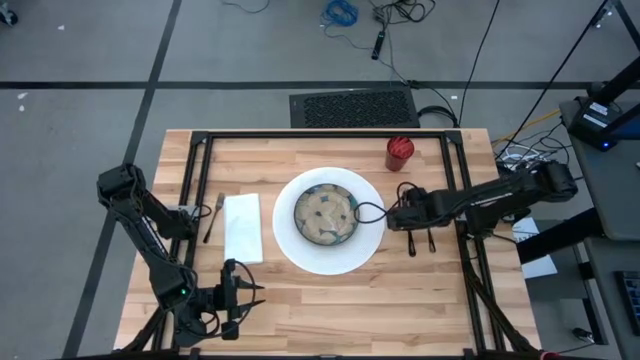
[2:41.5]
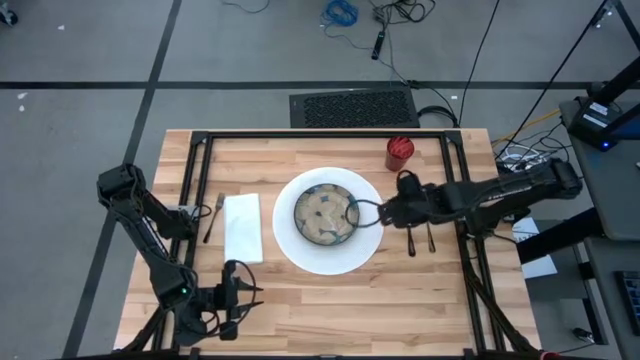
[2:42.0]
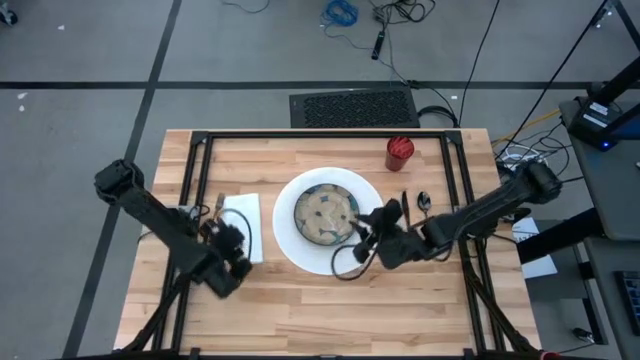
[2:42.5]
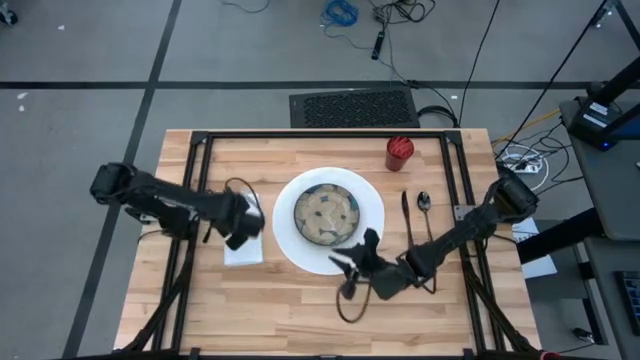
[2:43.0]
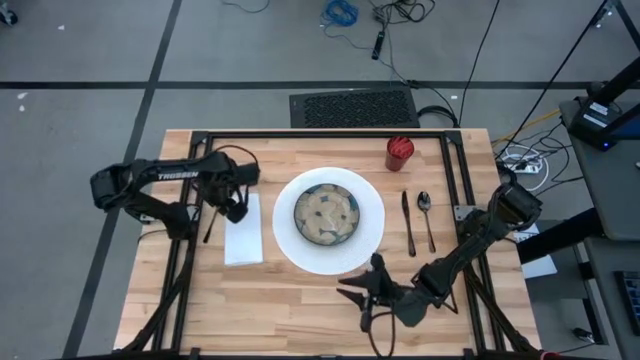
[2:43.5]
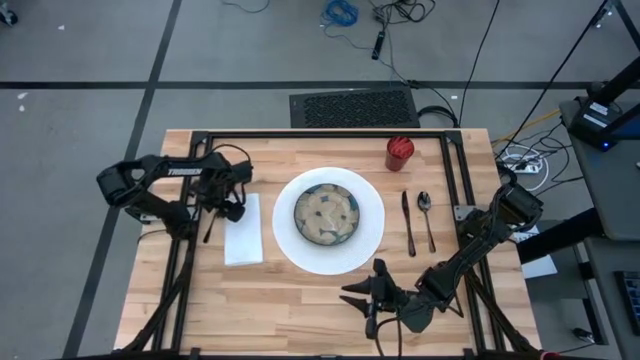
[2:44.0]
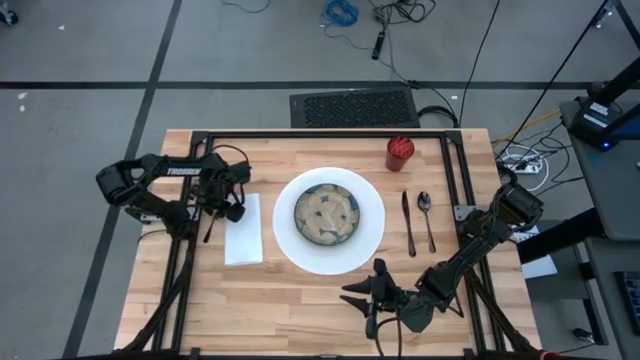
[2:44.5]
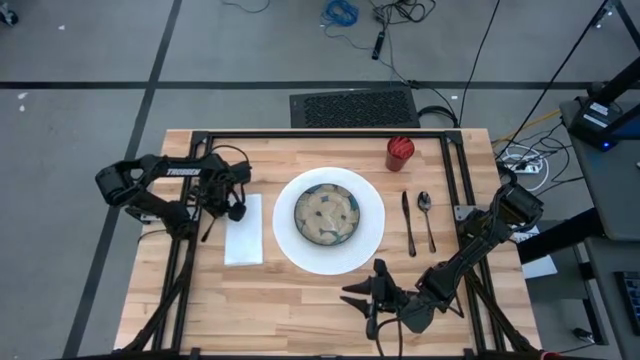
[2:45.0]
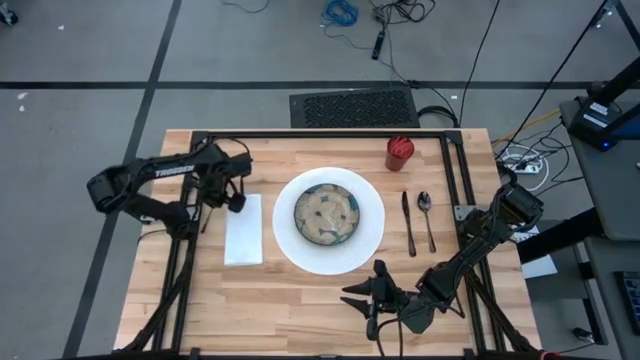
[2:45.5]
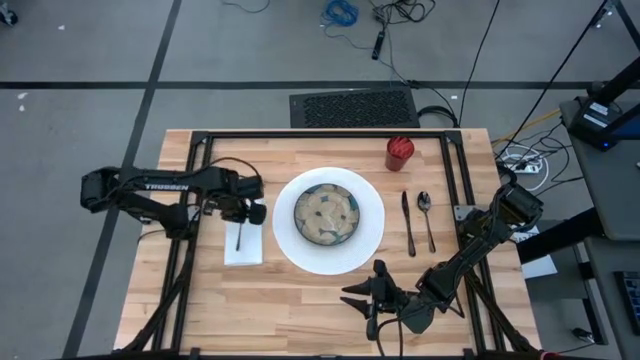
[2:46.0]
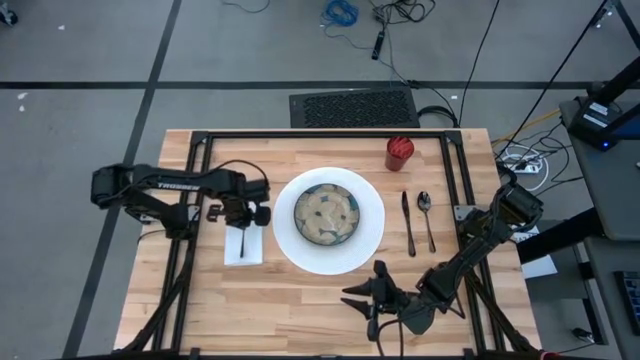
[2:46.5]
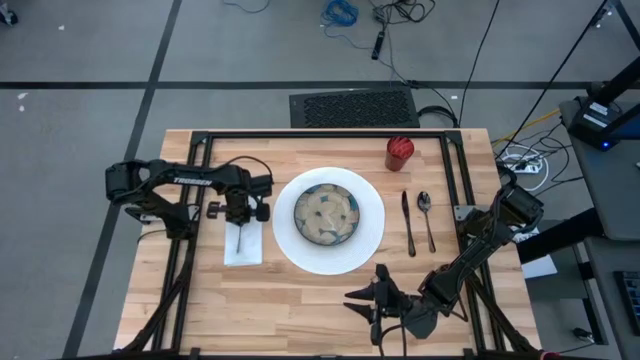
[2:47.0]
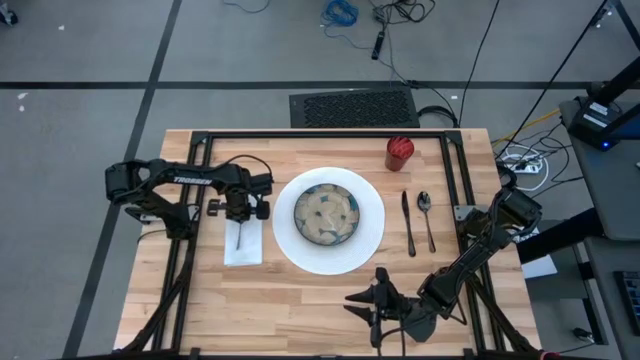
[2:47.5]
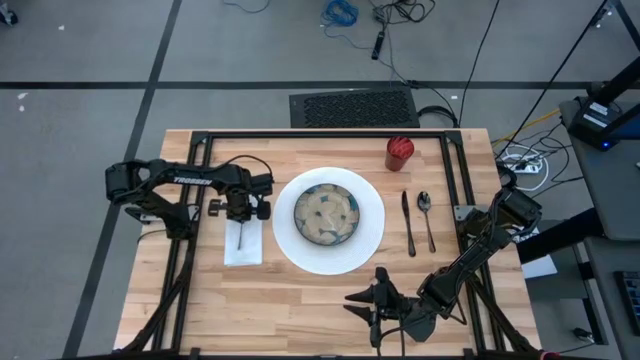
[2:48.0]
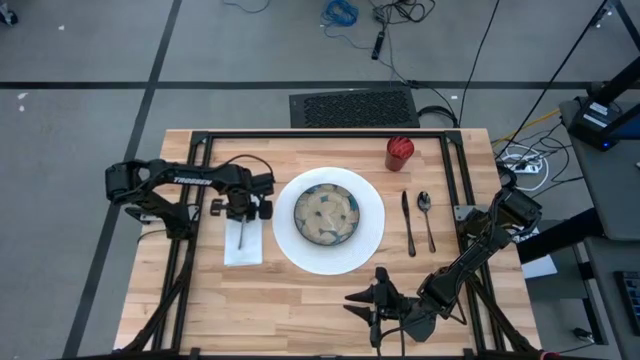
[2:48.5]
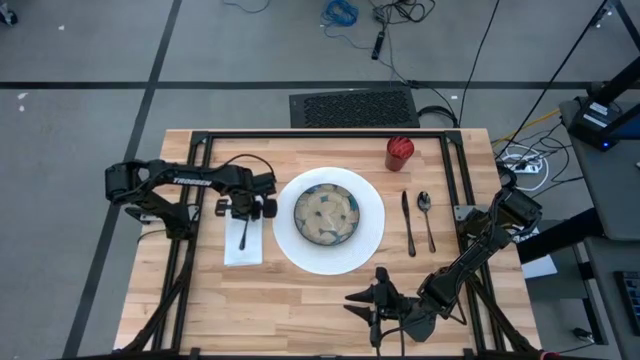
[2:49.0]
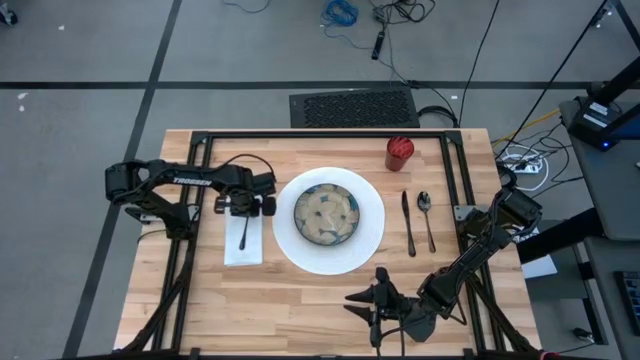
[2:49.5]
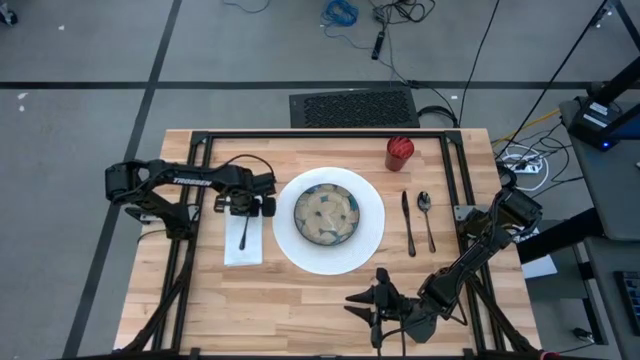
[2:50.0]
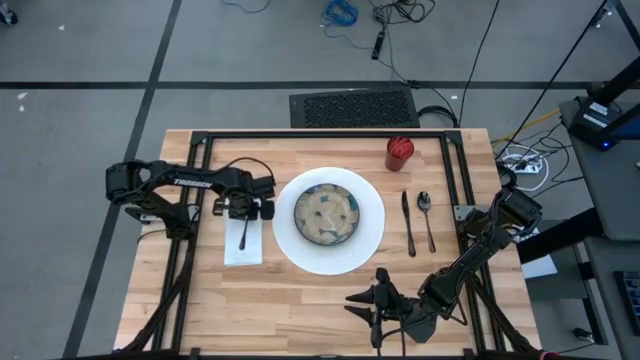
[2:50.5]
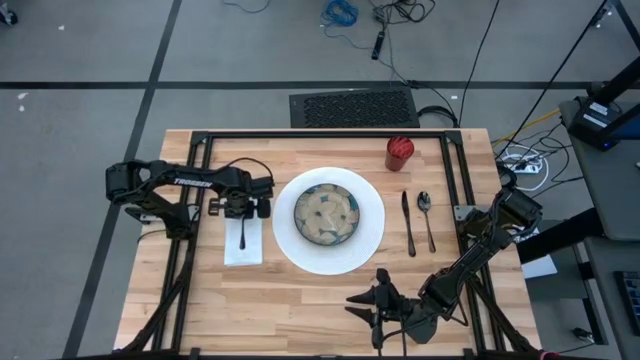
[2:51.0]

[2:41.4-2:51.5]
Task: Set table place
Put the black fork on the white table napkin

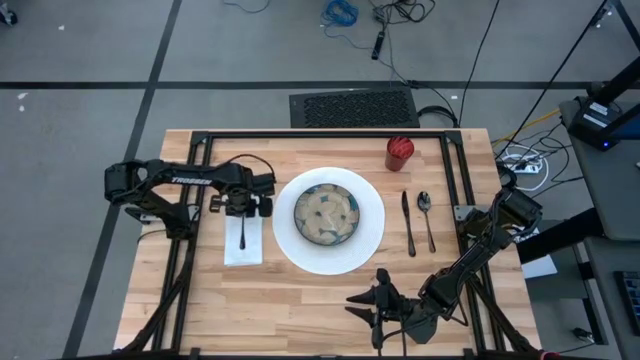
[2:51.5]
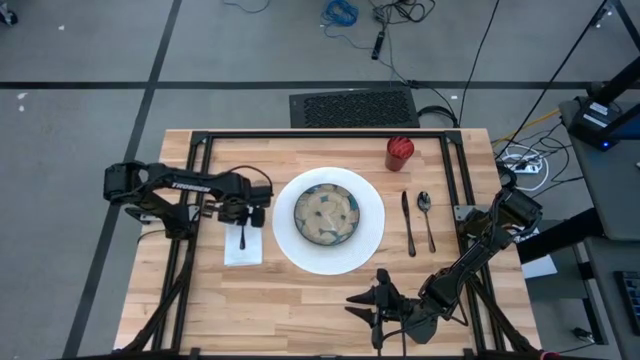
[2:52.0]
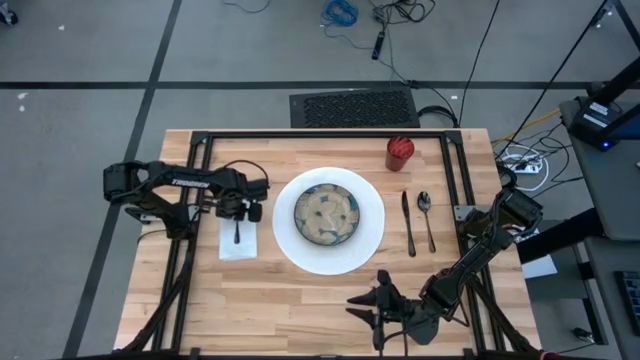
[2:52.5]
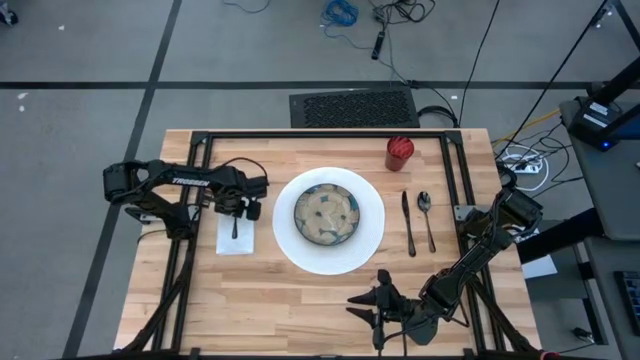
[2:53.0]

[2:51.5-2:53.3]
Adjust the white table napkin

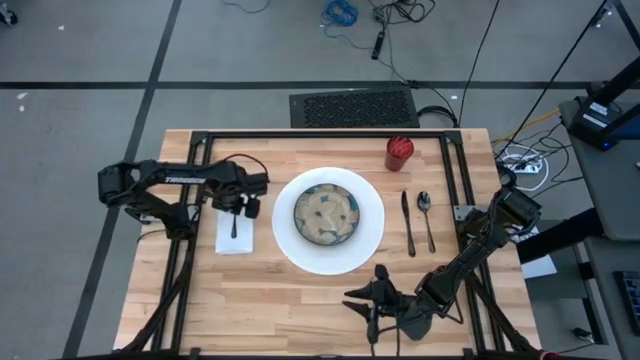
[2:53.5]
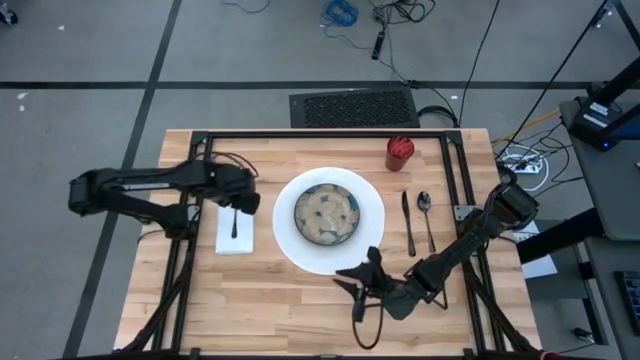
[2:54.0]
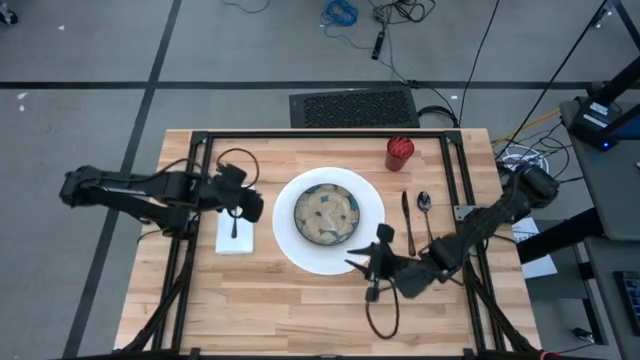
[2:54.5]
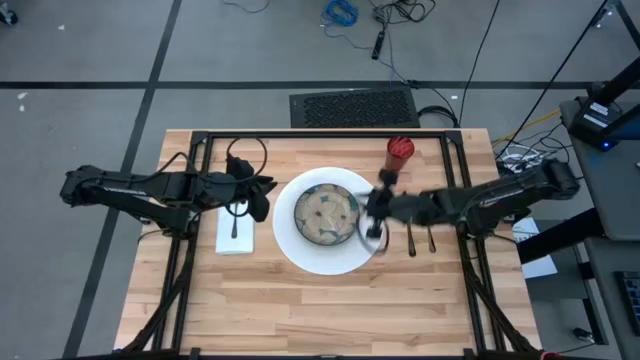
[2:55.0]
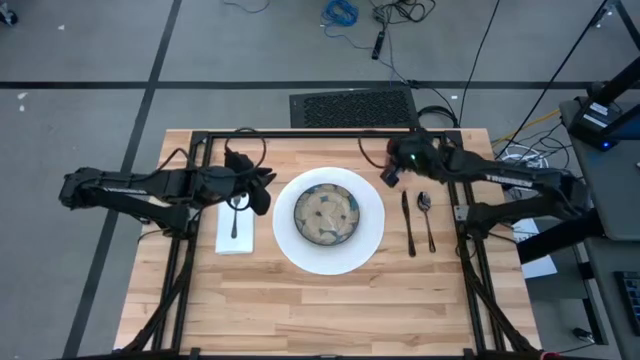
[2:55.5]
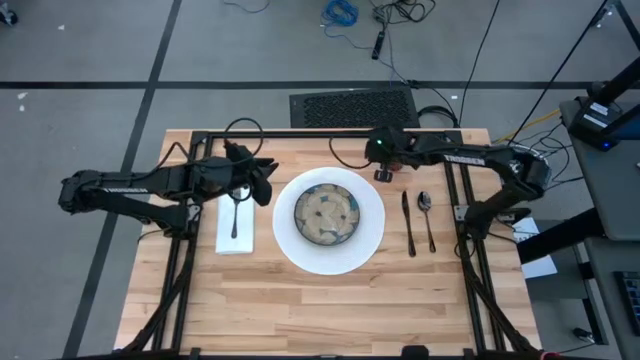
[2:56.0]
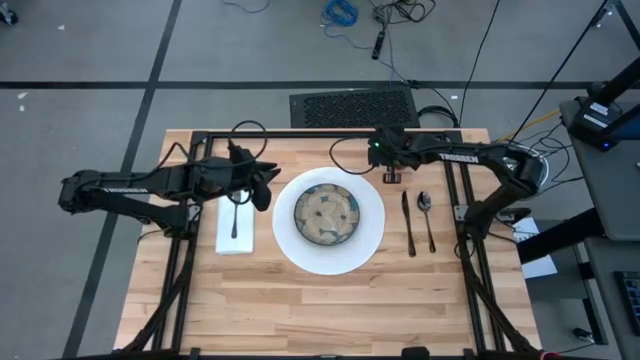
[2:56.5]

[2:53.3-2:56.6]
Adjust the red glass

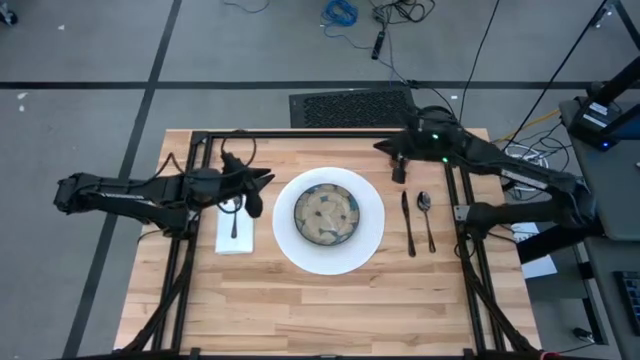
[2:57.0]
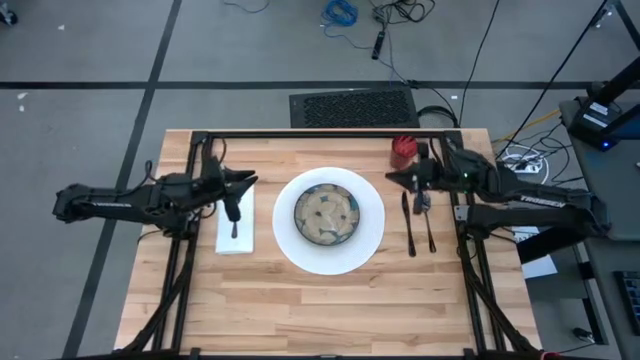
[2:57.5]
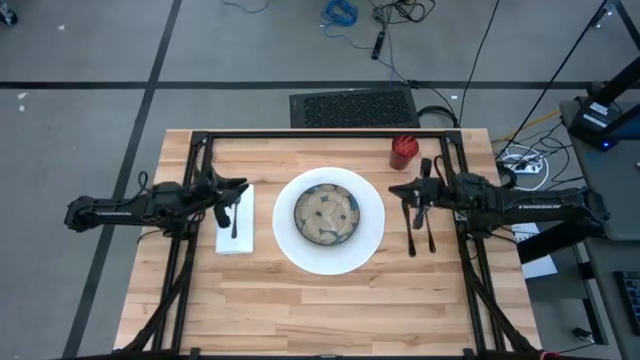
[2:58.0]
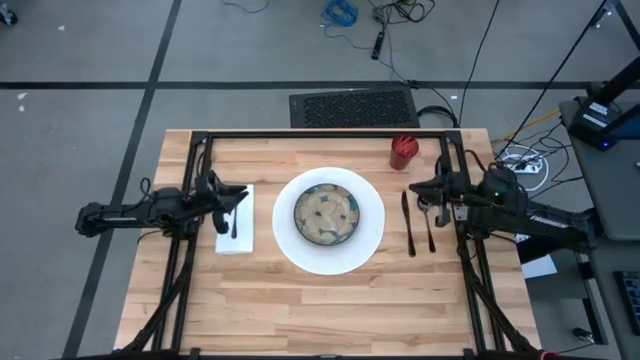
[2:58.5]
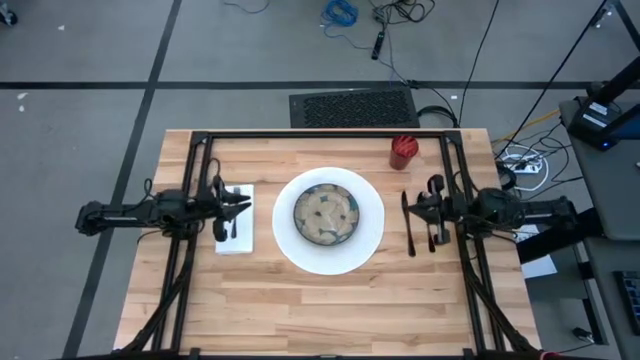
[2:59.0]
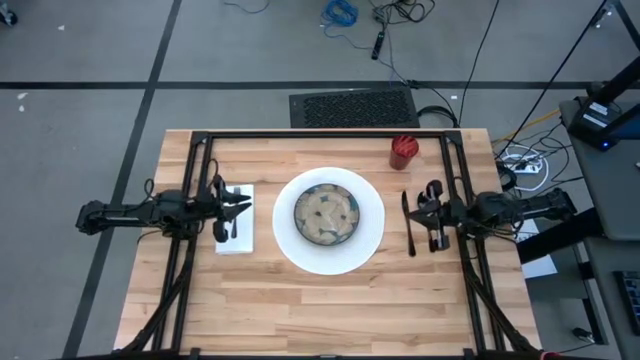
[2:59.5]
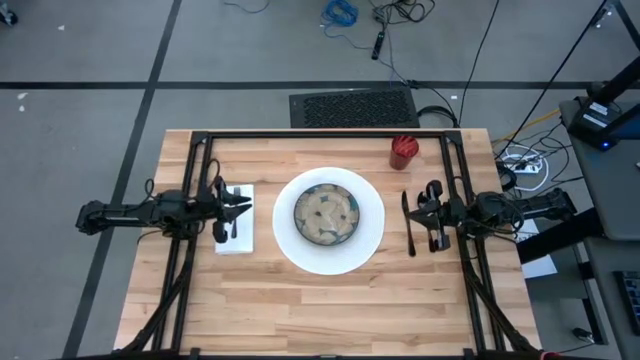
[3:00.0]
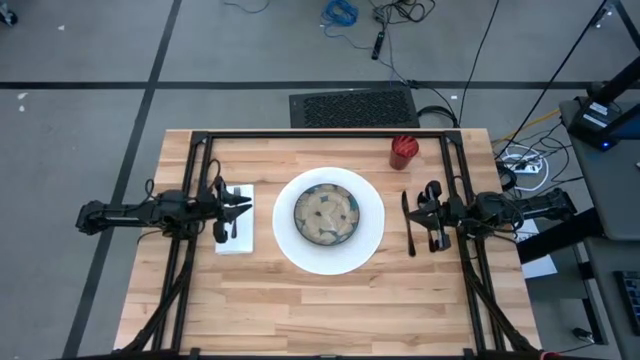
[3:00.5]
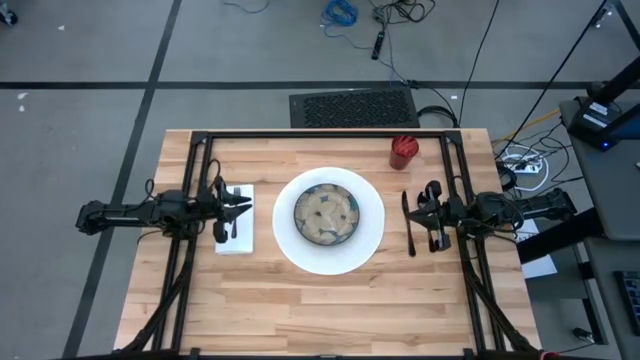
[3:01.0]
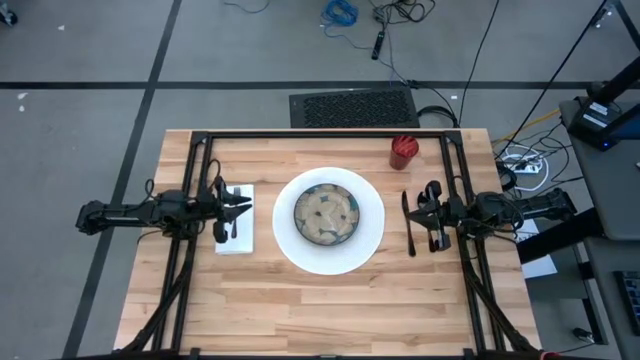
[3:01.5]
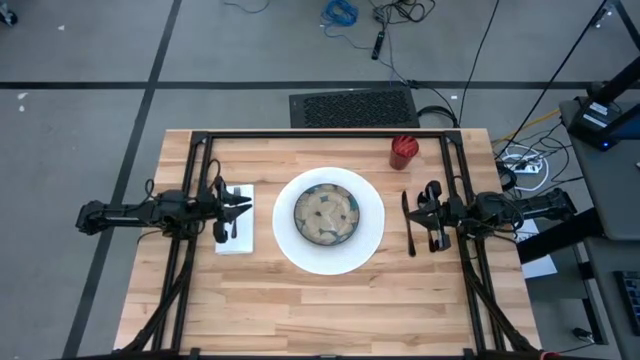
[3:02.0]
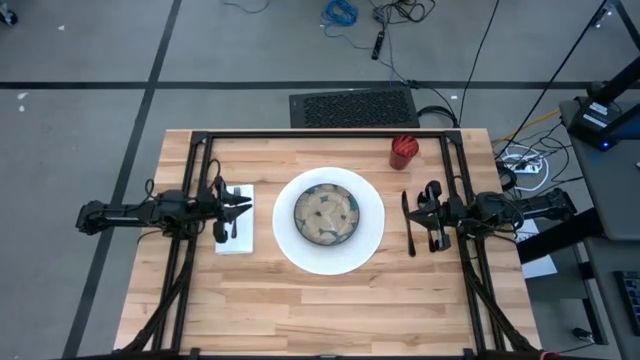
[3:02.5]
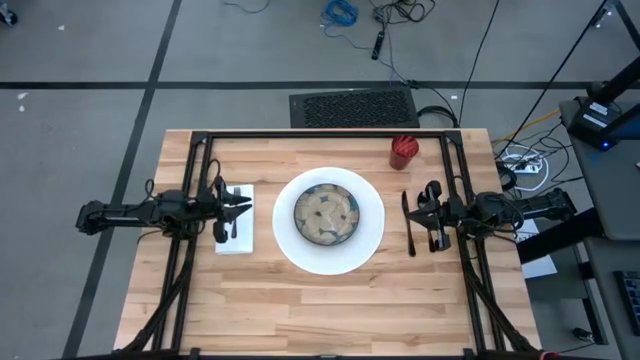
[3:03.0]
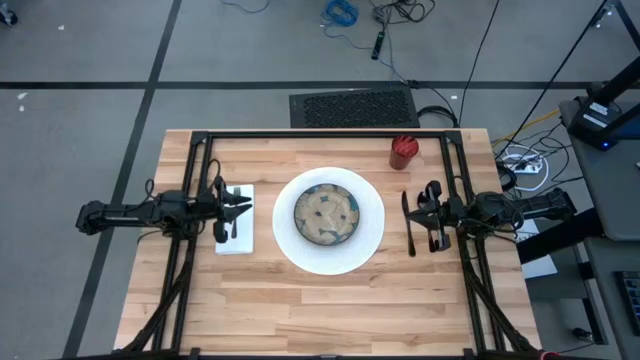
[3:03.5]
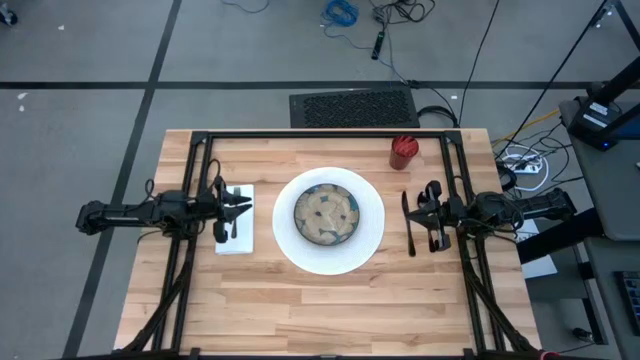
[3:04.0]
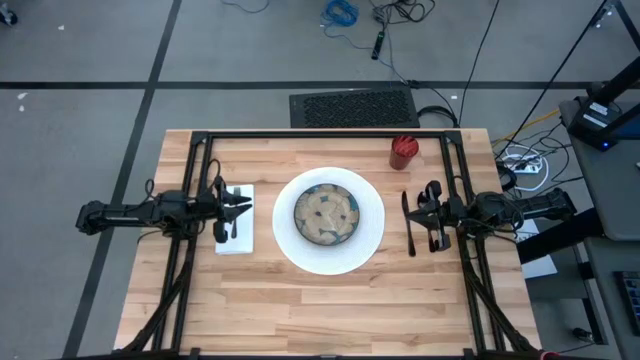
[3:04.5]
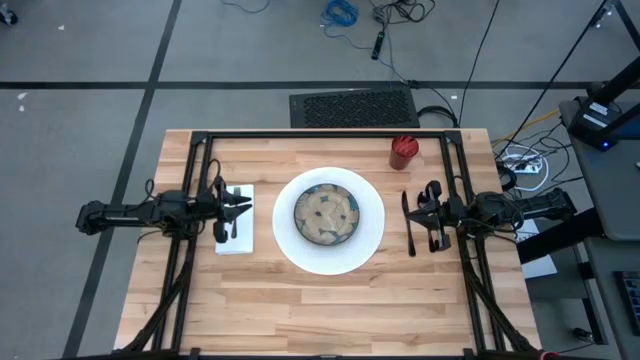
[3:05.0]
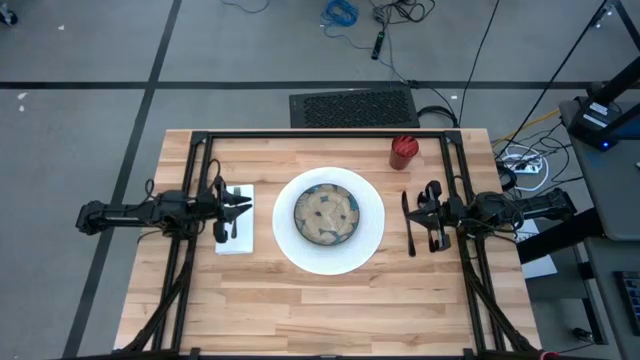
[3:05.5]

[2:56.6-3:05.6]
Return to Home Position
